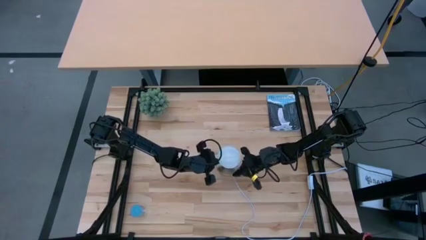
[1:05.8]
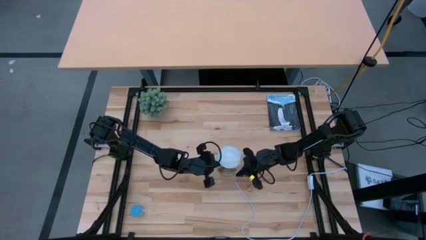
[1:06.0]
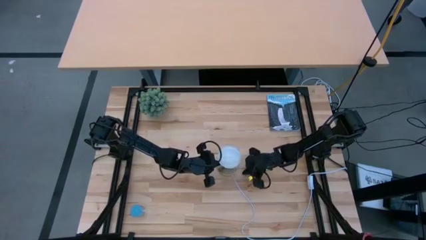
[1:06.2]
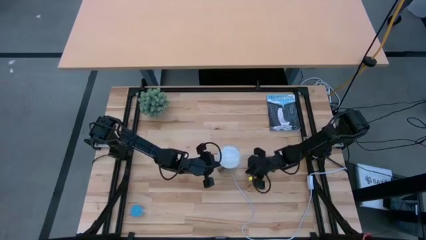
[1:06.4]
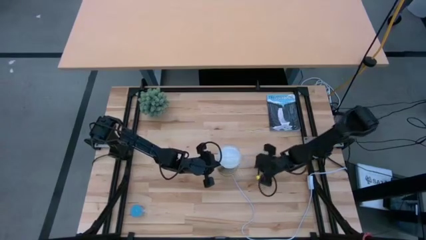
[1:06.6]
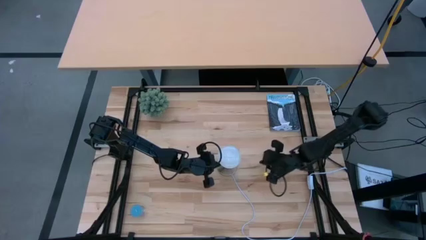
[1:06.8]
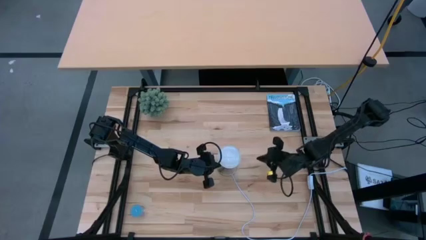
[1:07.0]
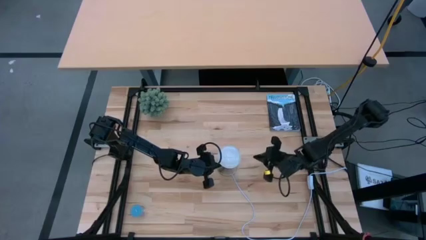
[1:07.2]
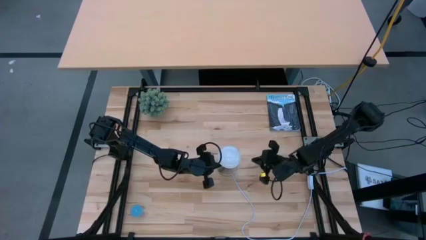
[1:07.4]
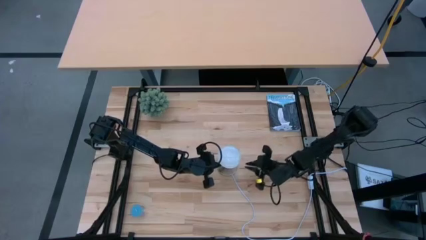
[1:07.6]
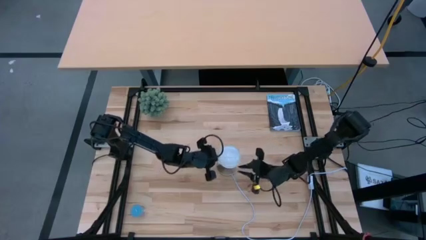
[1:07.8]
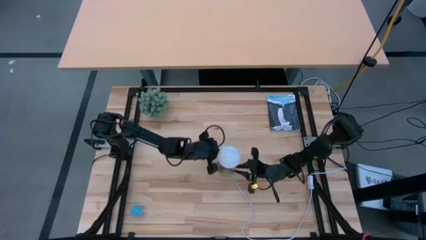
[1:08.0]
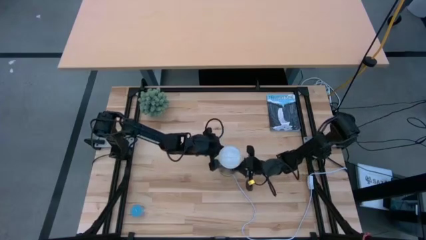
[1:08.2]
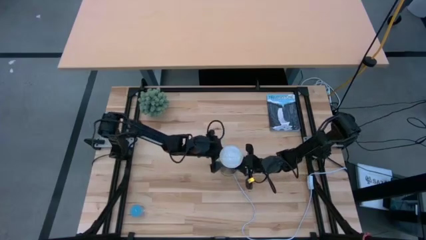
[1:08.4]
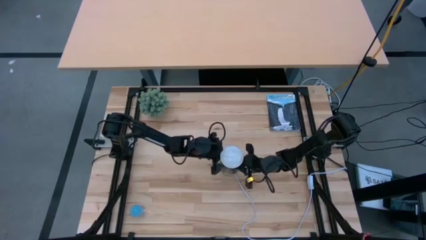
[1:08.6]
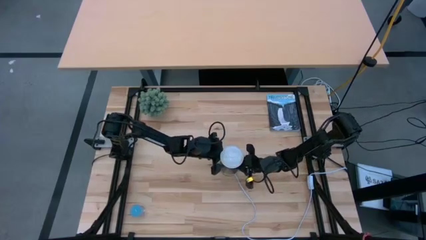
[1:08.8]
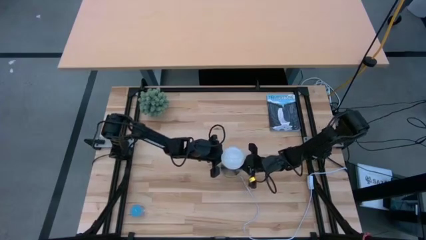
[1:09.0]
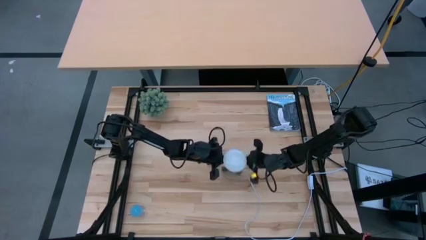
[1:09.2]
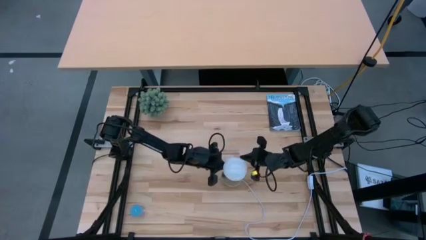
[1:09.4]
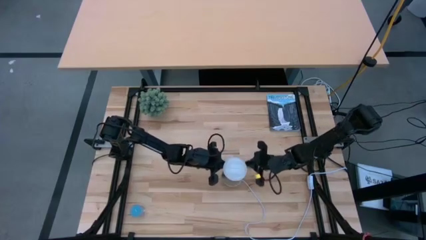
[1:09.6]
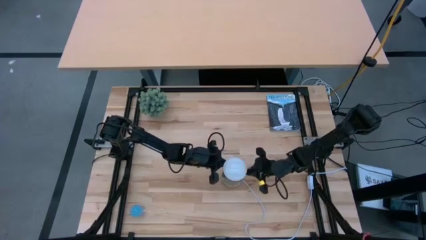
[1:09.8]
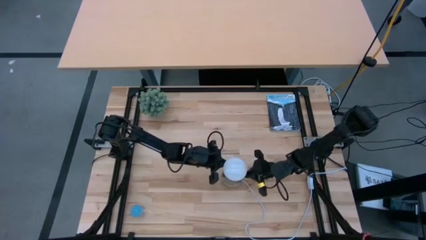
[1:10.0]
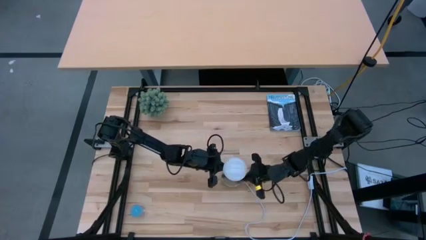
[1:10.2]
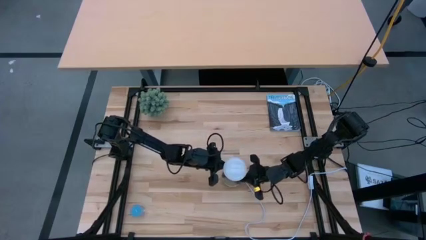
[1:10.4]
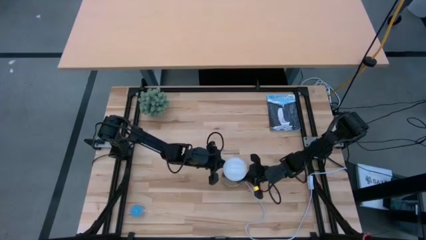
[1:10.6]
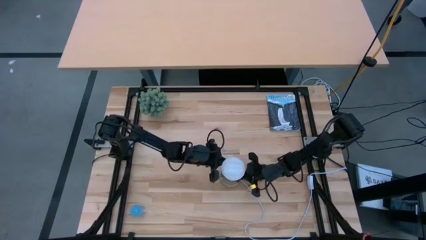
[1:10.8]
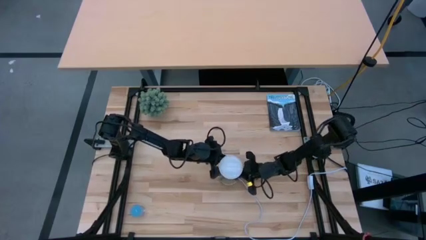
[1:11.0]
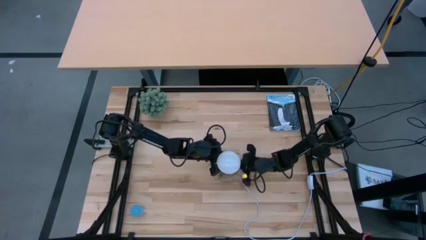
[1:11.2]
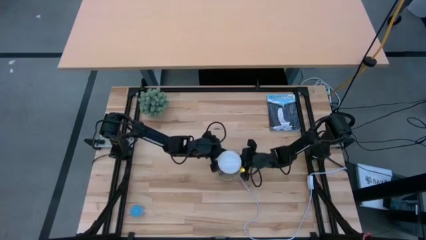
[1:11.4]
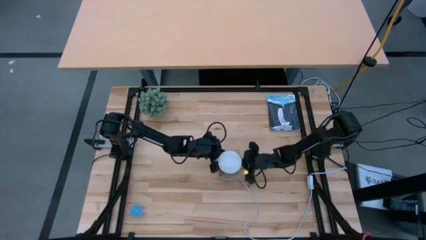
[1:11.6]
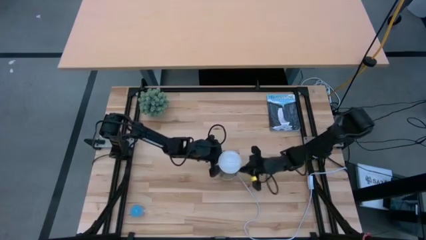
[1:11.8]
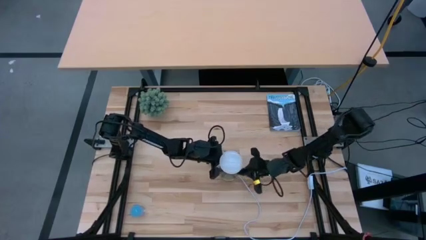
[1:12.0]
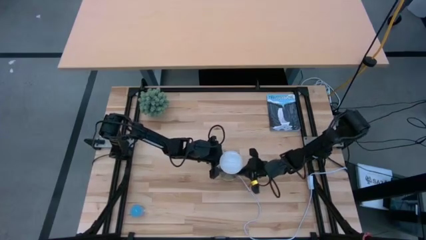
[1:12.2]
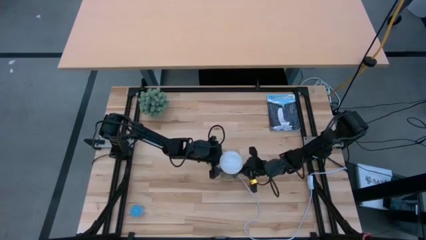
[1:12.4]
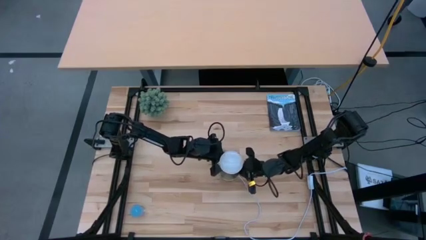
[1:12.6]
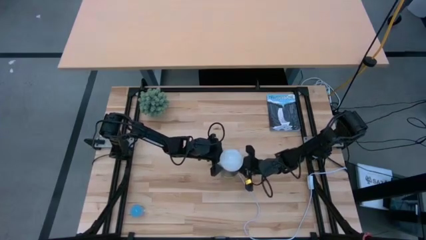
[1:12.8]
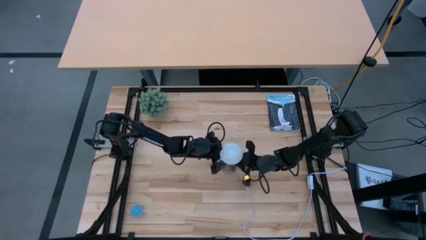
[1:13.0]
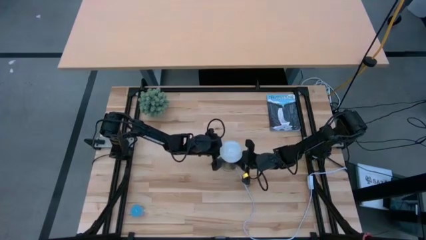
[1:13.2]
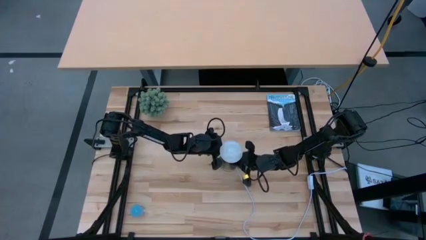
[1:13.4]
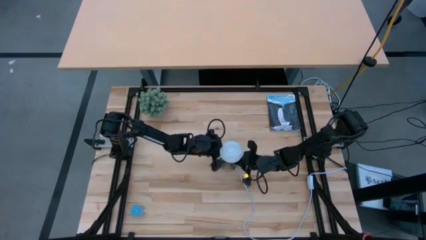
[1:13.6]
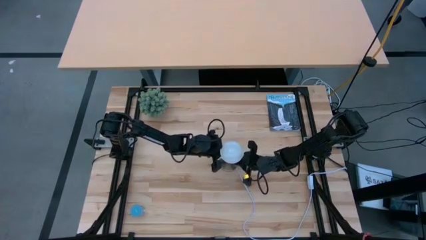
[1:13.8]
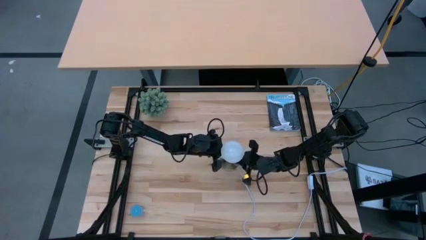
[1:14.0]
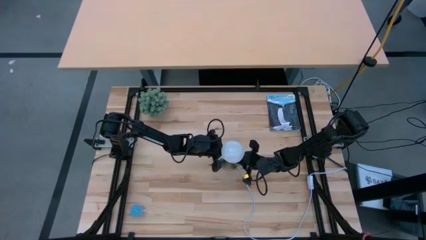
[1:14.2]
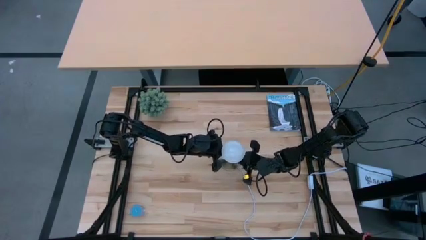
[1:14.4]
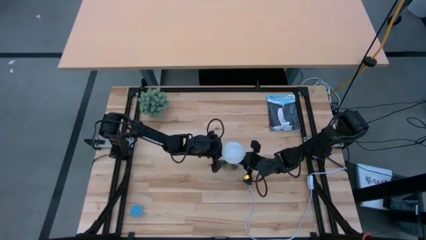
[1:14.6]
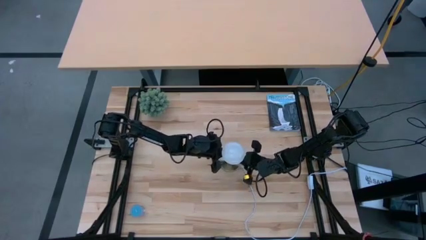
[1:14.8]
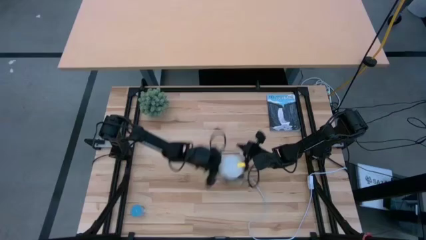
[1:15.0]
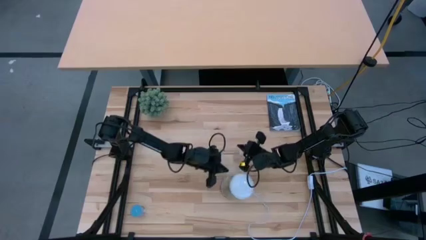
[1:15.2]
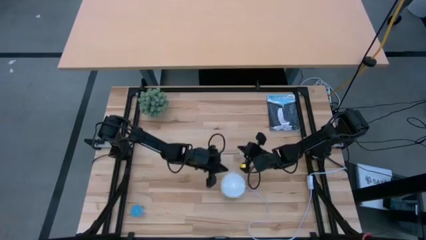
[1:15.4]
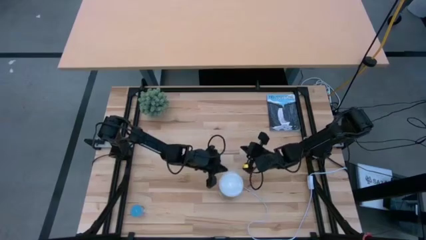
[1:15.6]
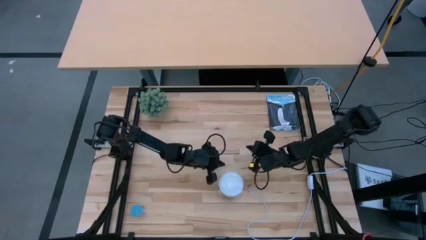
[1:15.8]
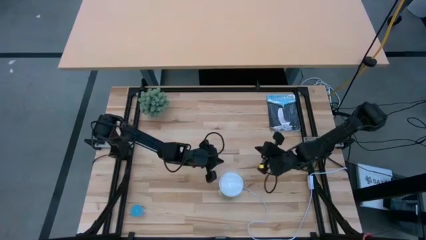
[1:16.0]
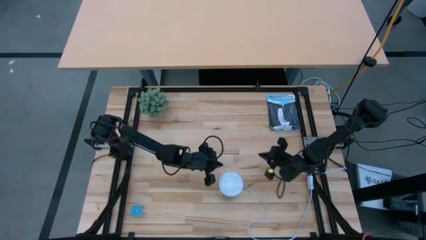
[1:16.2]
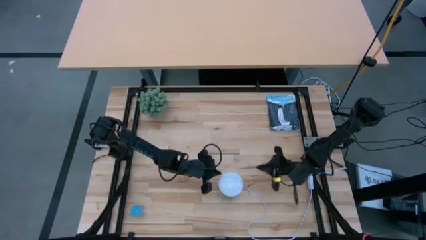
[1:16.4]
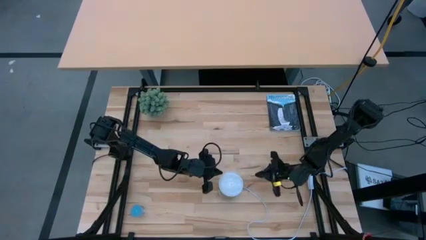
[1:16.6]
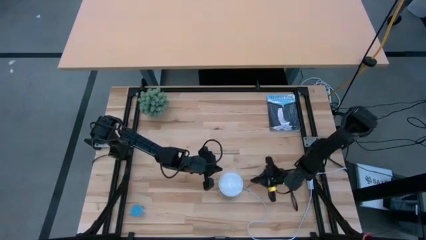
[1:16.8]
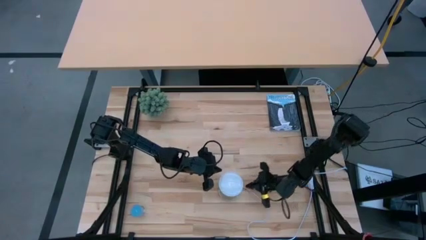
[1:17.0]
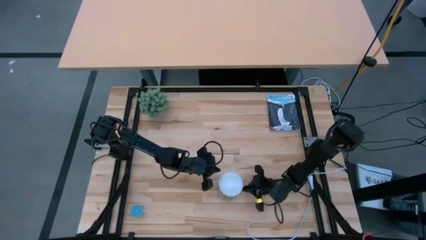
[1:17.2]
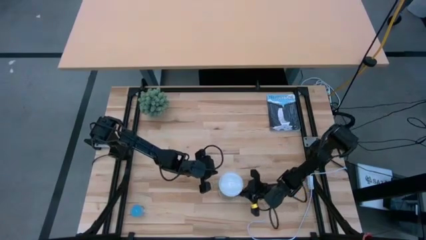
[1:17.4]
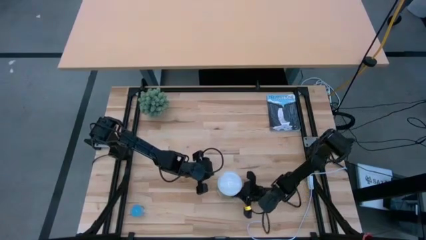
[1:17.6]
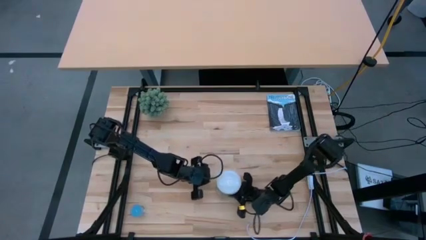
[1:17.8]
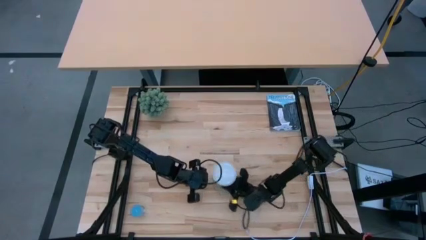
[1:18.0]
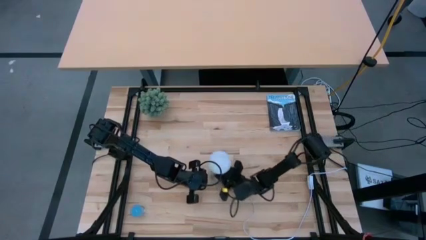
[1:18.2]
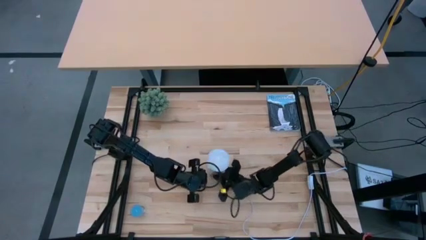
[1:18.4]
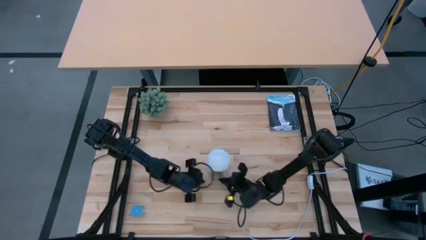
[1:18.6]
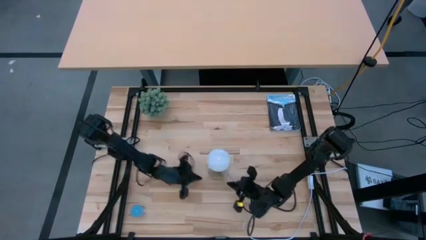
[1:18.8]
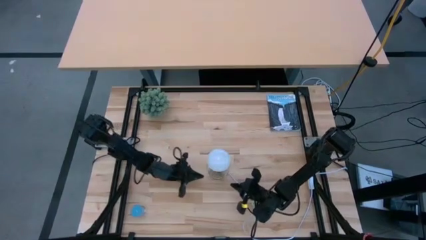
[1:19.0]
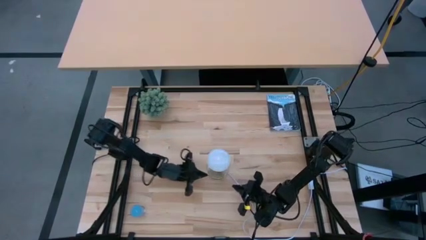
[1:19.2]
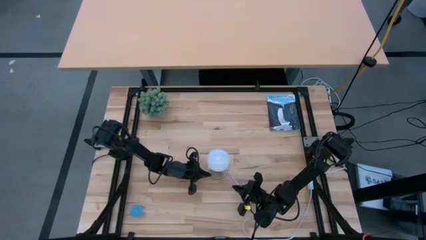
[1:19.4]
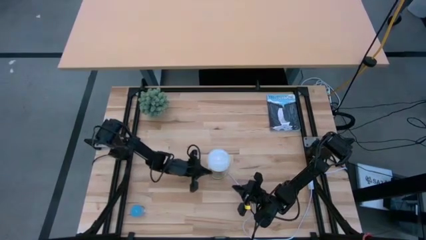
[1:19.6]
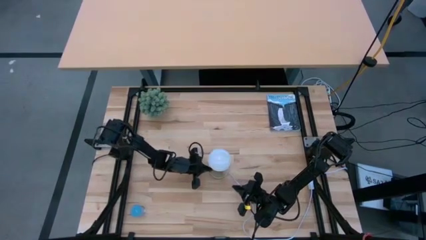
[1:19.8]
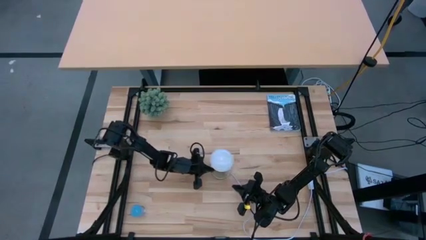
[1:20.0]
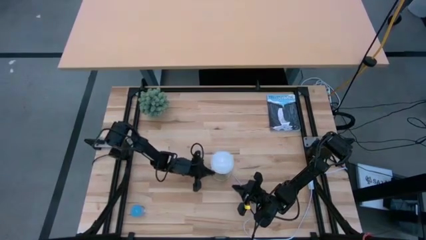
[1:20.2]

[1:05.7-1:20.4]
Task: Screw lightbulb
Remove the lightbulb from the lamp

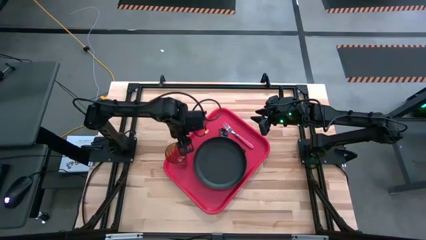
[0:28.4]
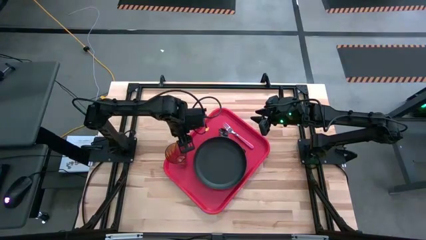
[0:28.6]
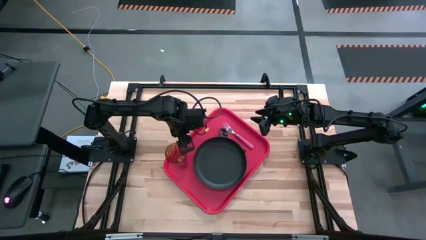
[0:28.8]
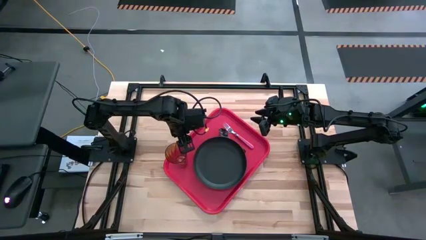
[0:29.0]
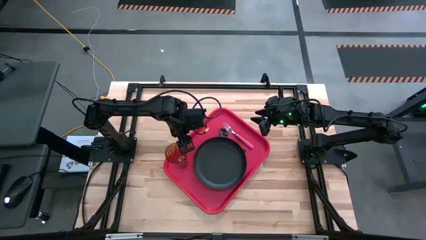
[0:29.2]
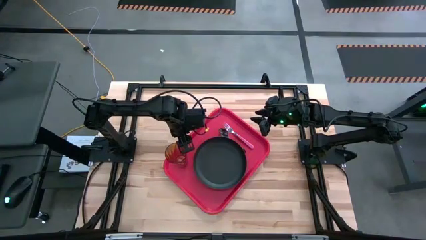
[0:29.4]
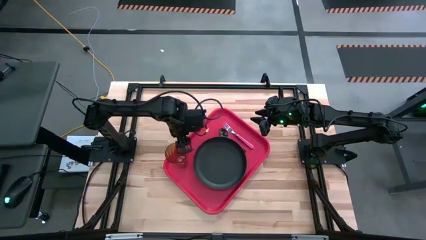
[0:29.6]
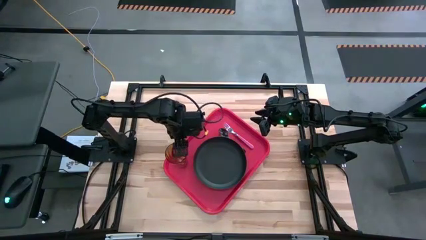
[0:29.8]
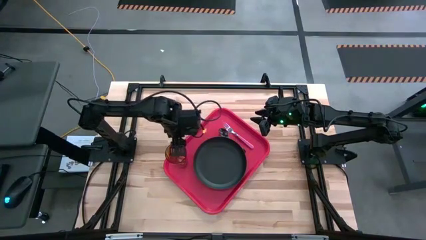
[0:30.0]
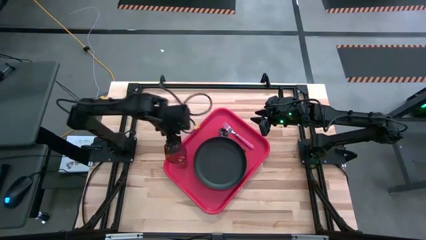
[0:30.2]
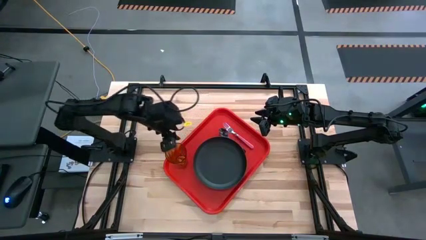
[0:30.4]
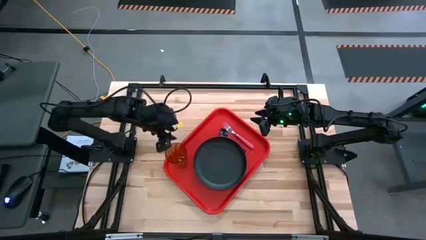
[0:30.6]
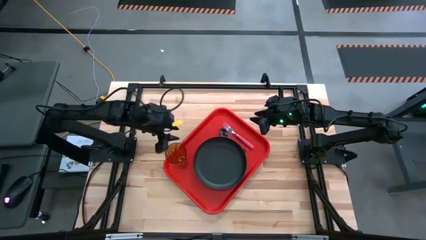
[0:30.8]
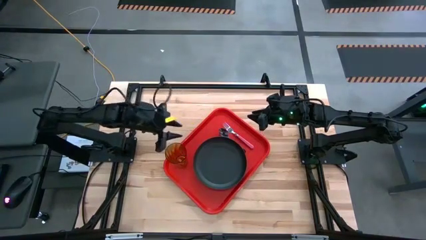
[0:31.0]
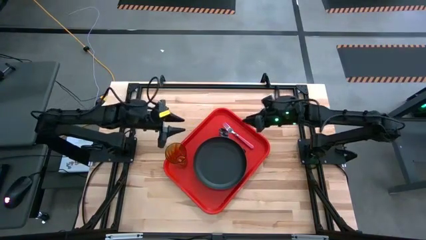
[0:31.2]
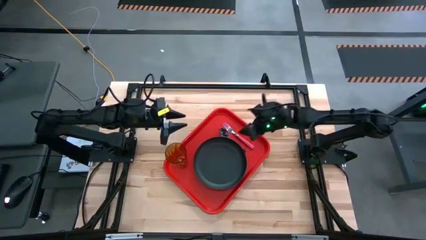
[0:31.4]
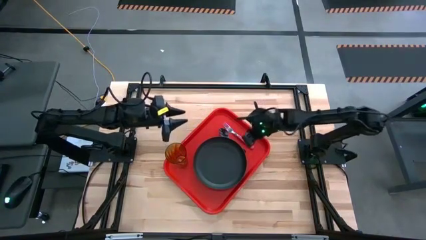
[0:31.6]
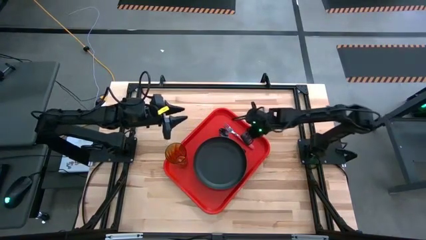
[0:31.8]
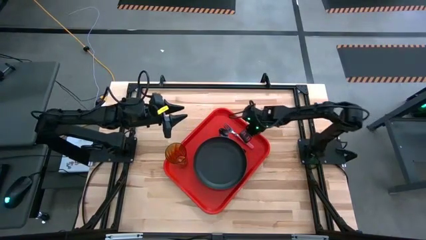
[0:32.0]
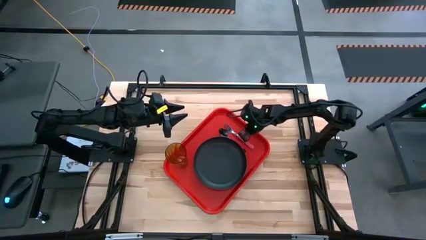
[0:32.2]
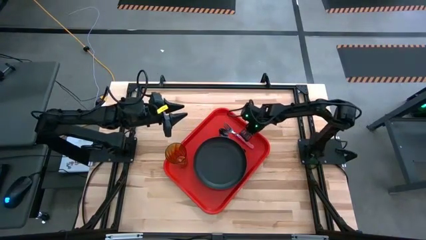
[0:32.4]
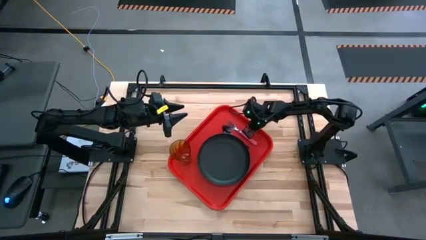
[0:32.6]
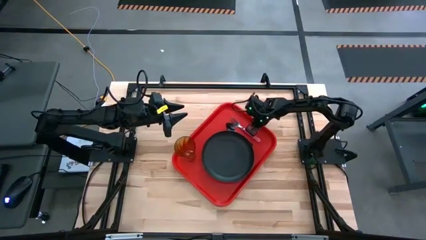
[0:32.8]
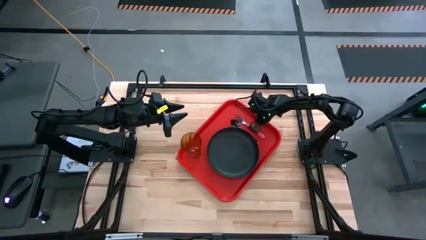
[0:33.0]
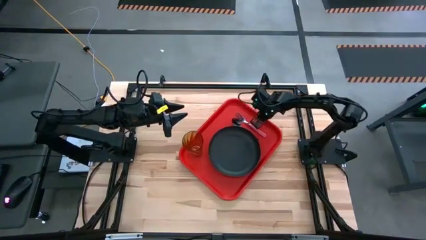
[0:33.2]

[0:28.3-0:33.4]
Task: Pick and place plate/cup/fork/spoon on tray
Adjust the serving tray
